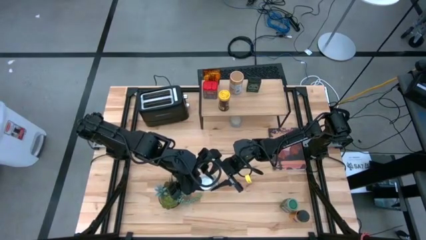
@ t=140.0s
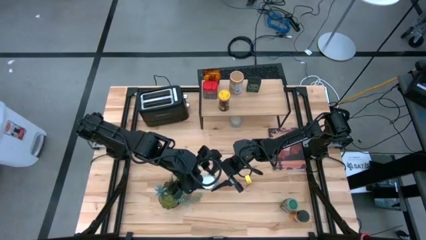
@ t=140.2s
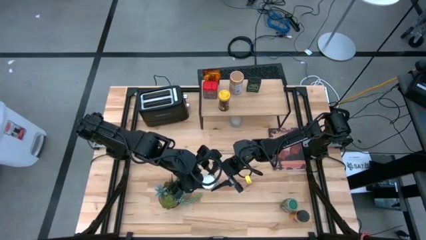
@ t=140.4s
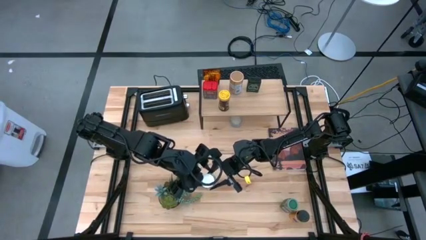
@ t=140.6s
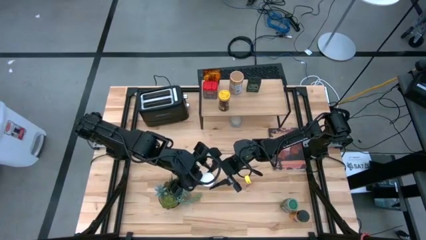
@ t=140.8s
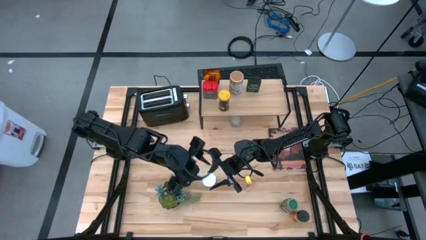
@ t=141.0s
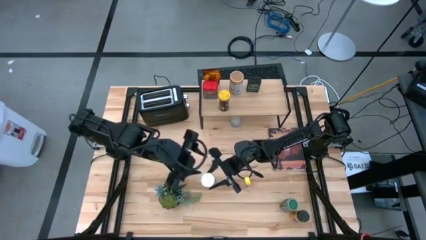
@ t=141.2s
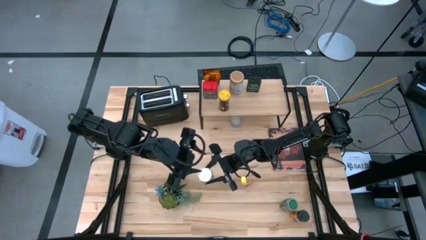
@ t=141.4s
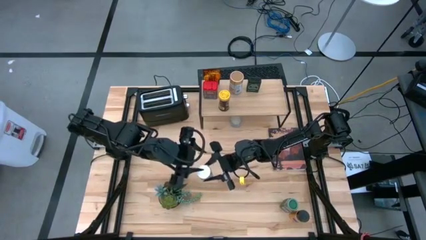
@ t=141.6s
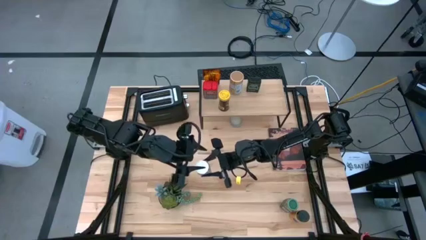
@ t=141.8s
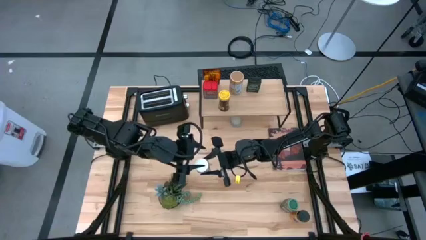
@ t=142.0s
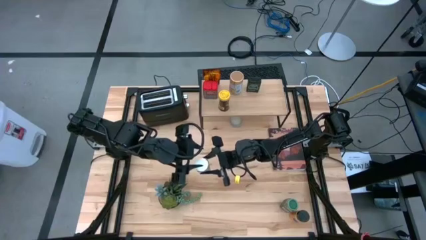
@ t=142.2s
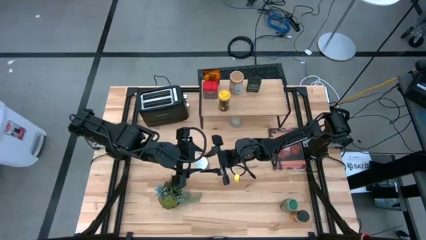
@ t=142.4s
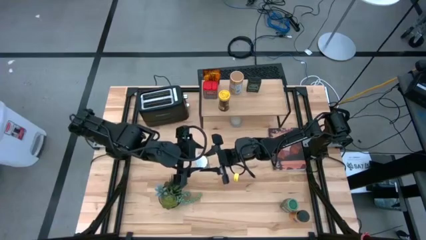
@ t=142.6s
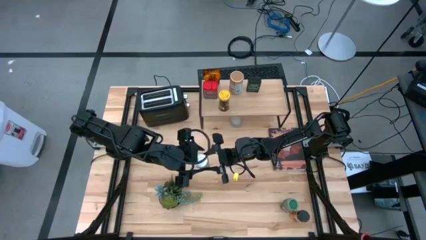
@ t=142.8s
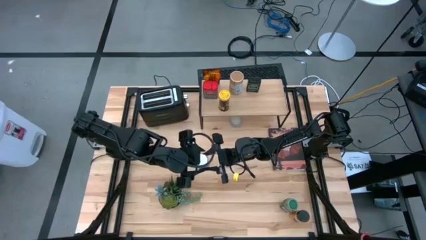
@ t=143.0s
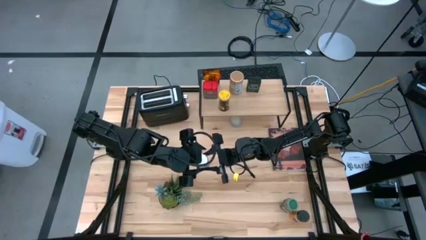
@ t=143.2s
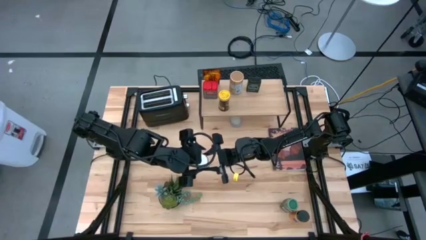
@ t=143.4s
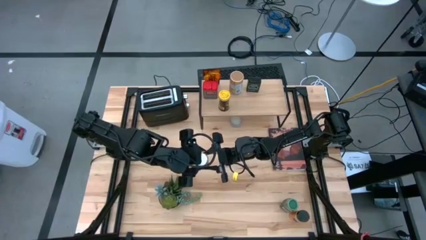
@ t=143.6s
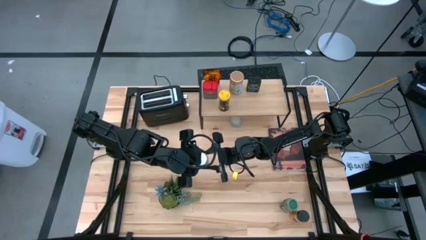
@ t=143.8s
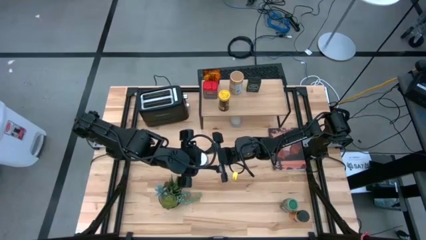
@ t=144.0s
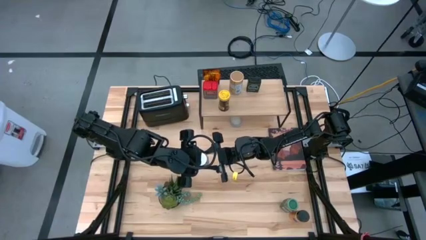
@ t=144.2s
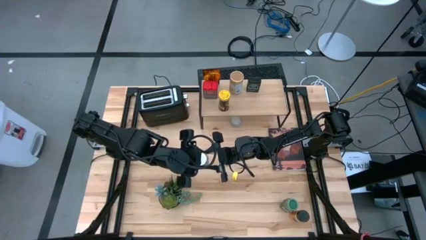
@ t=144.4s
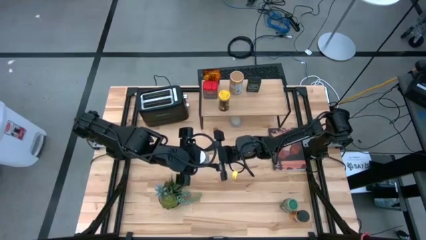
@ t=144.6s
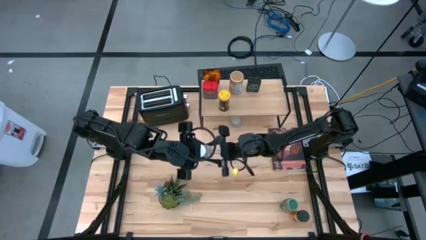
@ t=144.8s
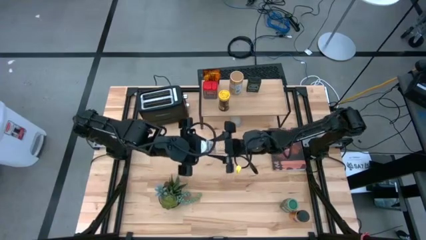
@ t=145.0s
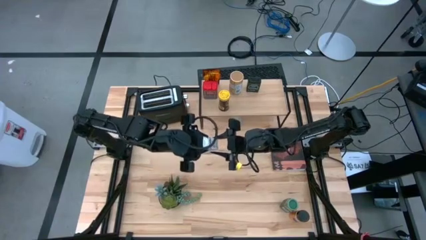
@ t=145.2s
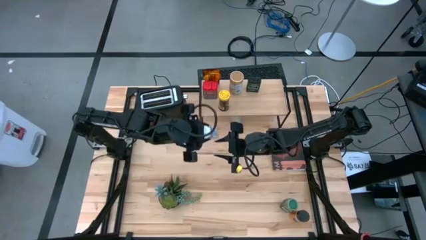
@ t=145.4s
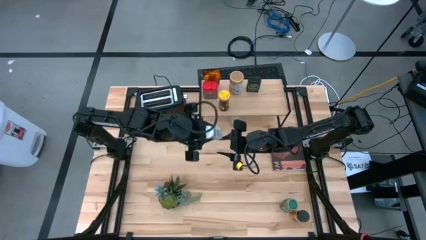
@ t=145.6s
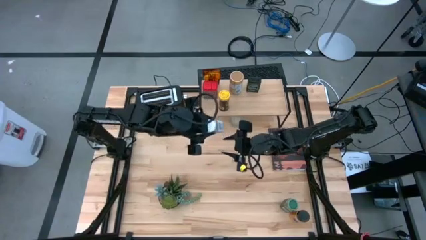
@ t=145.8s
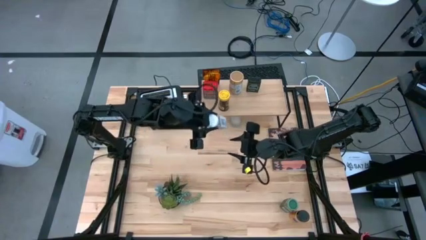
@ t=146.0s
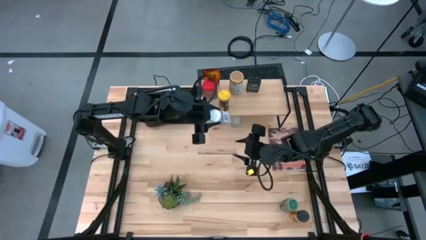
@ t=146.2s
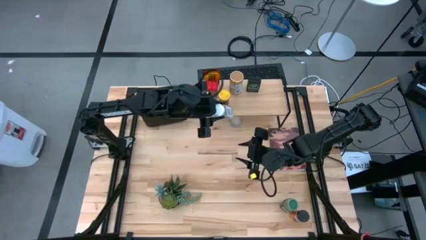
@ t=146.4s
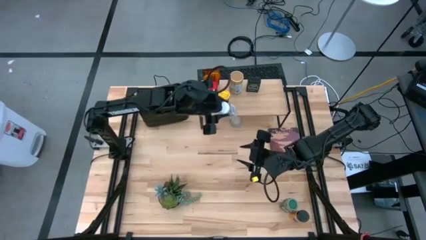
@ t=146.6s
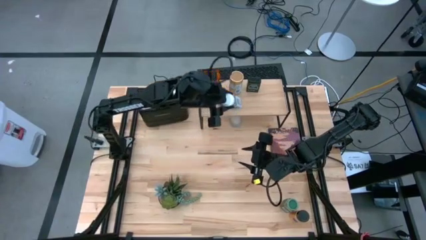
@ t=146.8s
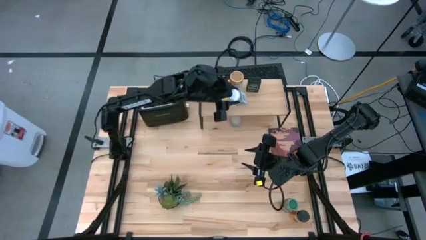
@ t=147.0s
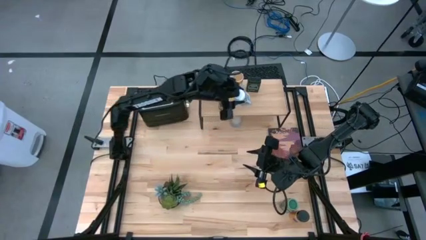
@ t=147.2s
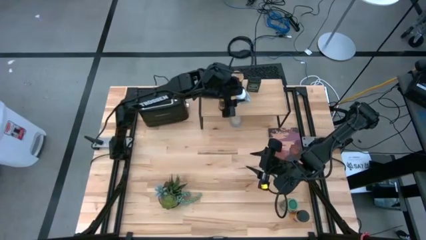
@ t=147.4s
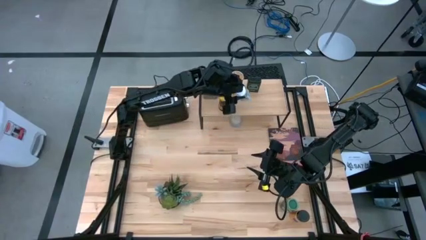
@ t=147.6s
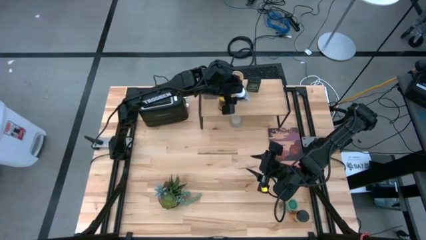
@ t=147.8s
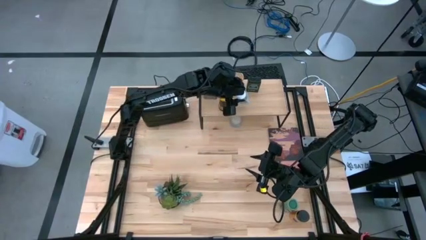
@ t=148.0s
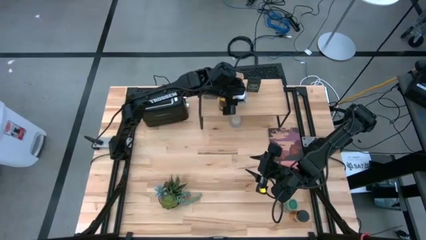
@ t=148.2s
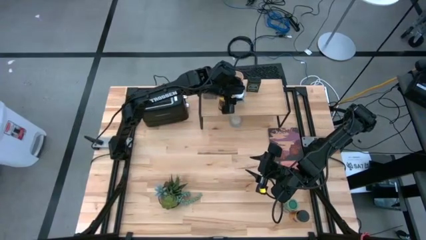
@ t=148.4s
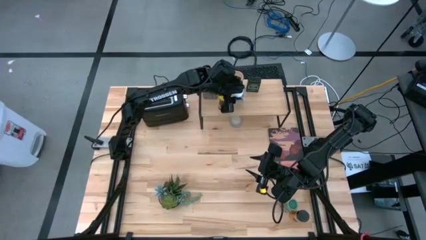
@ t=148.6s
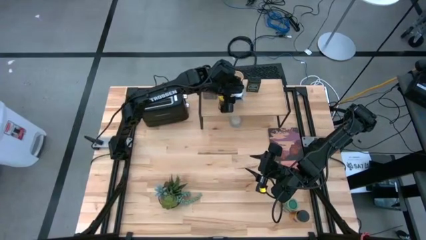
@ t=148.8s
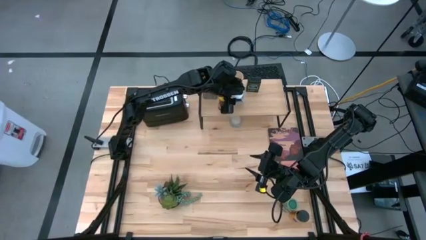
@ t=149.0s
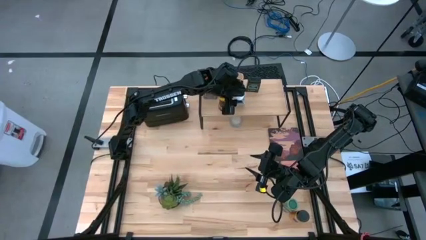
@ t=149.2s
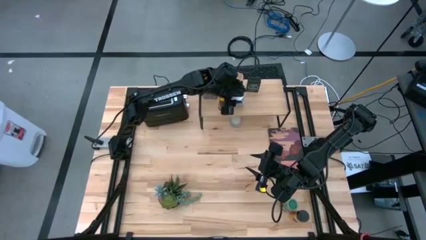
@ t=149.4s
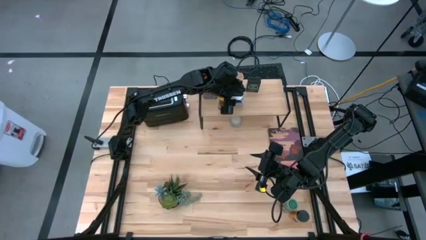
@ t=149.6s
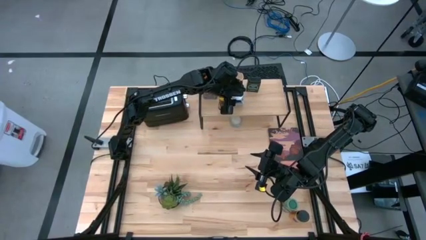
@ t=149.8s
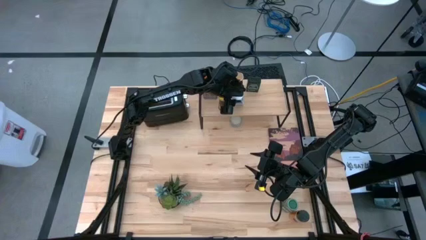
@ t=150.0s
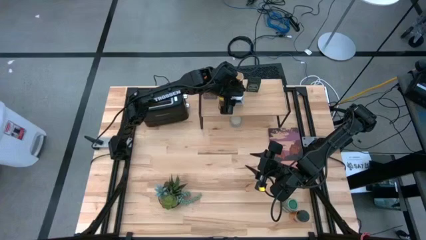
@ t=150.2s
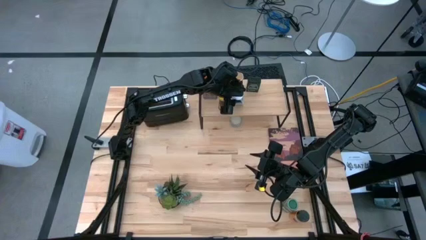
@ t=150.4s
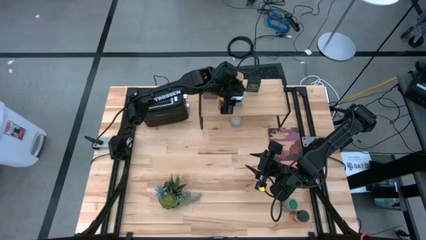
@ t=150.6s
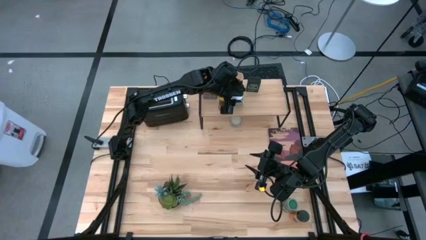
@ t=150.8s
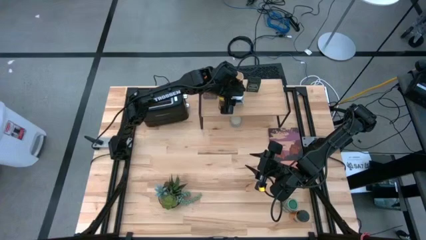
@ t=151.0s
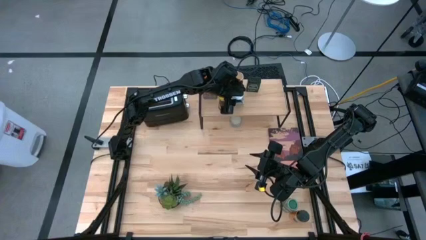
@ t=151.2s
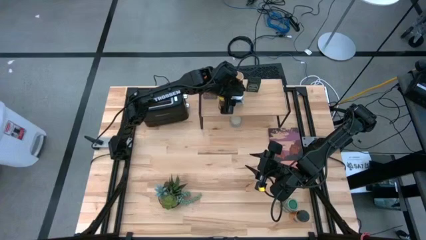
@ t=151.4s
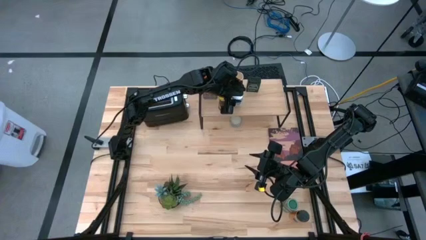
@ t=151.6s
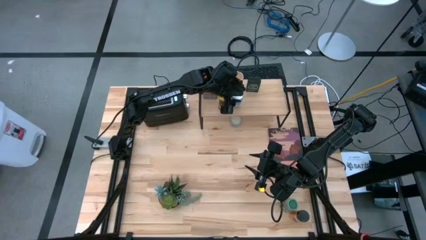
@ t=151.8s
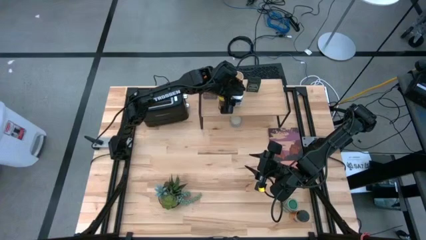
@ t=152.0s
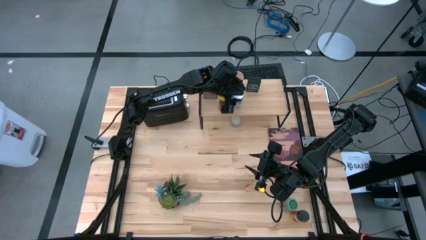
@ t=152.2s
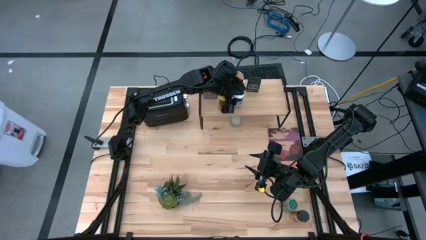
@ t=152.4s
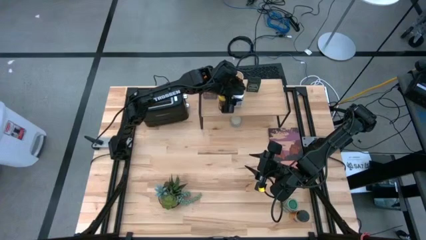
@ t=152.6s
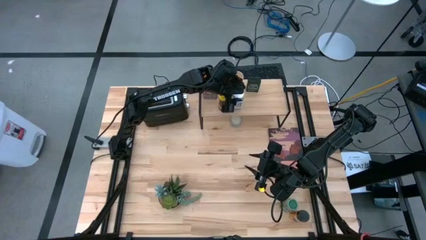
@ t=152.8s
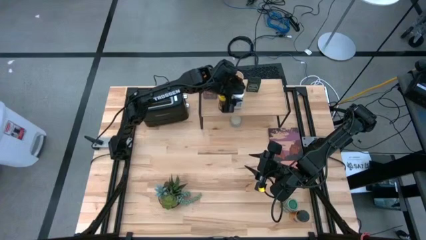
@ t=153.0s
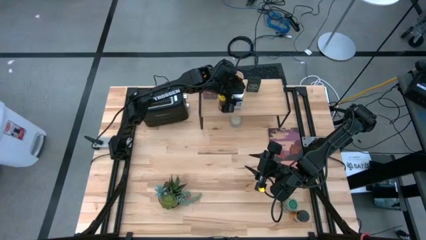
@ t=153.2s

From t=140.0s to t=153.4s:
Task: Shelf spices
Put the white seasoning bottle on the shelf

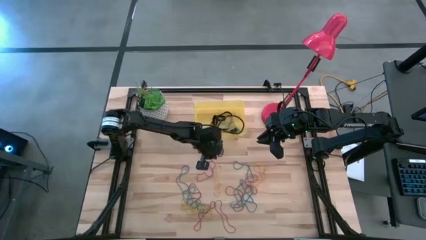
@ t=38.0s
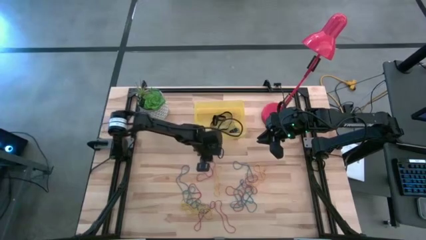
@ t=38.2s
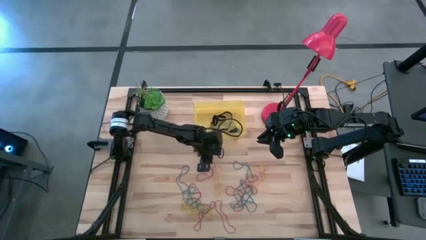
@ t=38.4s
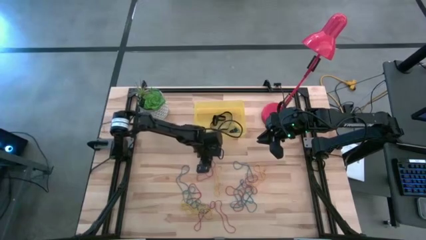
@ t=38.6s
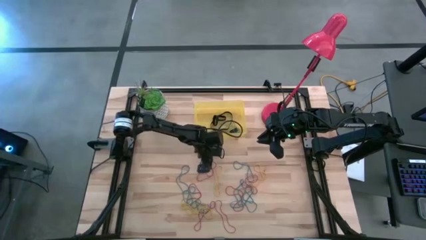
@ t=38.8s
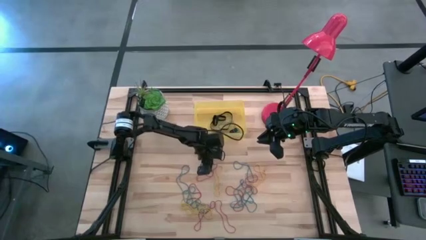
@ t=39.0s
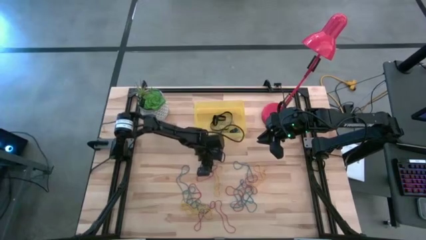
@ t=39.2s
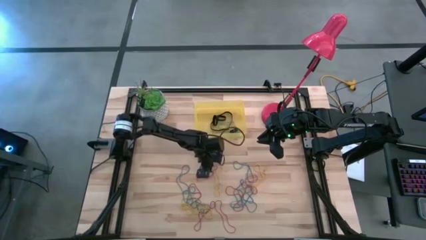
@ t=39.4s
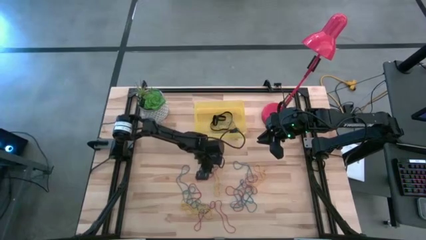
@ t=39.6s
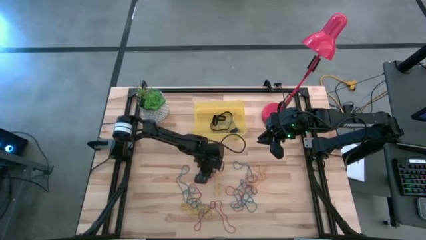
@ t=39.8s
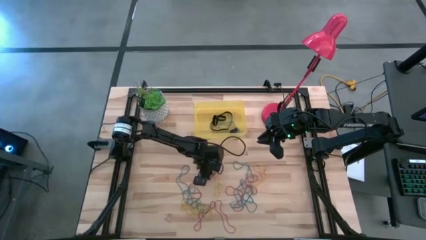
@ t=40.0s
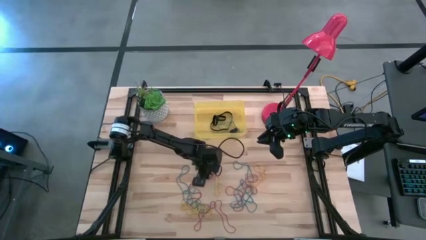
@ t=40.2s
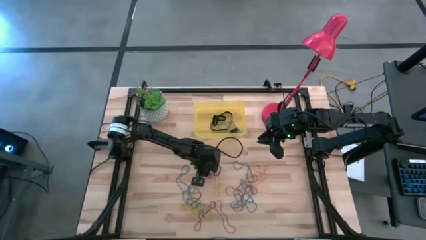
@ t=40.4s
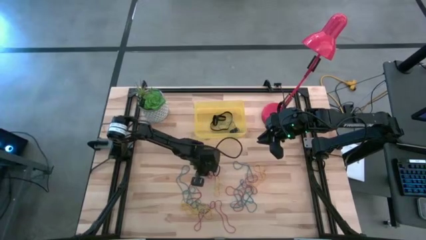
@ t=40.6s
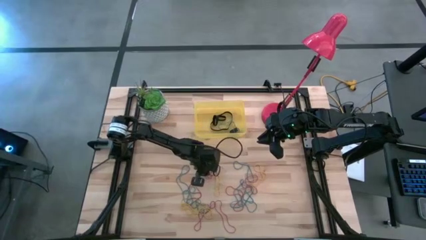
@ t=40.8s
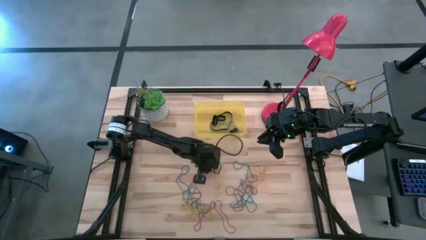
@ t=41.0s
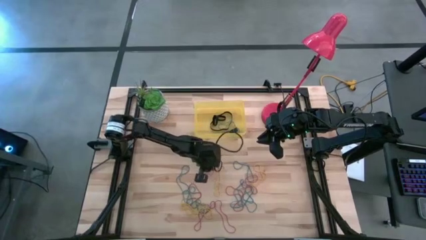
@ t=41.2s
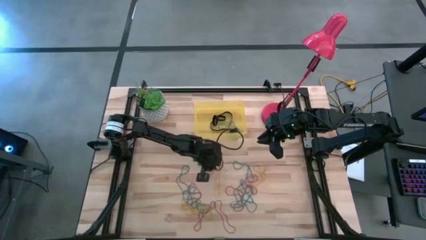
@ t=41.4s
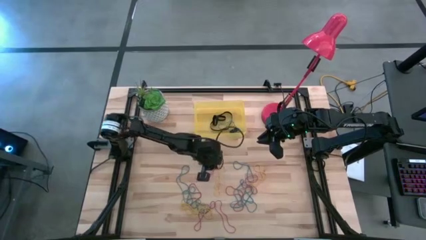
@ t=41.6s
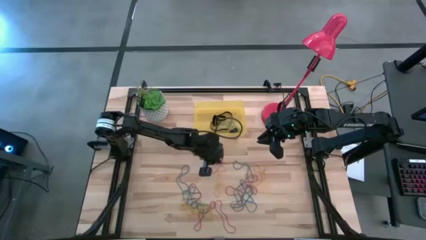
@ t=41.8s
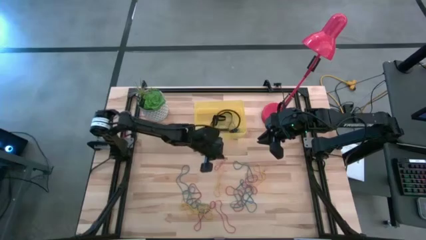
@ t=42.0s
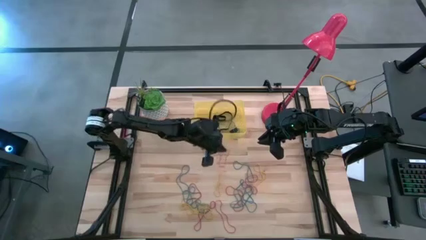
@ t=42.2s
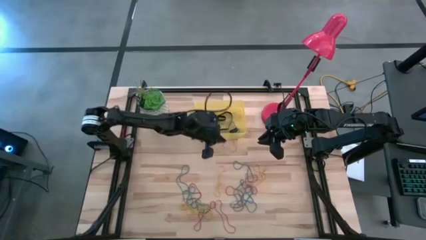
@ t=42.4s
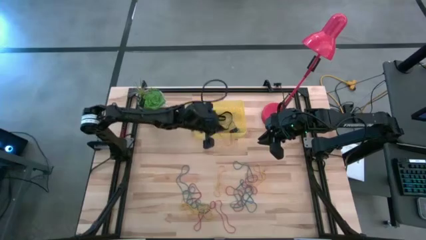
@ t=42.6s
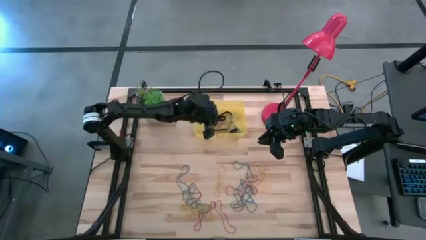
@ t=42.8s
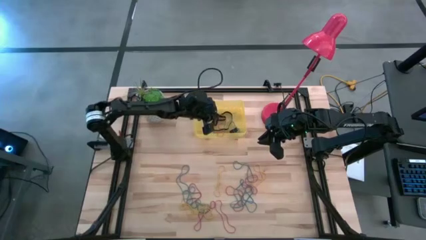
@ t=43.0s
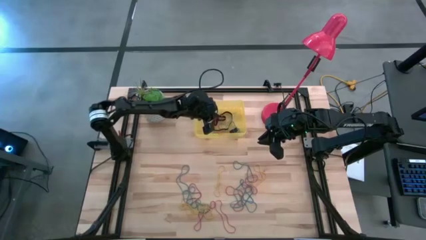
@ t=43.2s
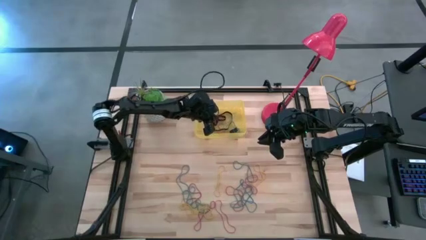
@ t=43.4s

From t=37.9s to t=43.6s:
Task: Pick and place rubber bands into bin
Put the red rubber band into the yellow bin
